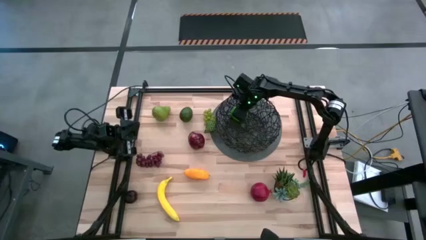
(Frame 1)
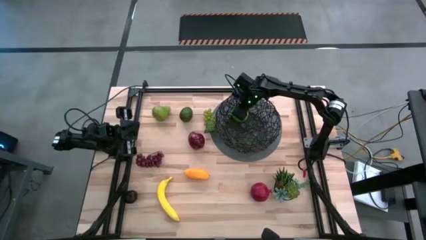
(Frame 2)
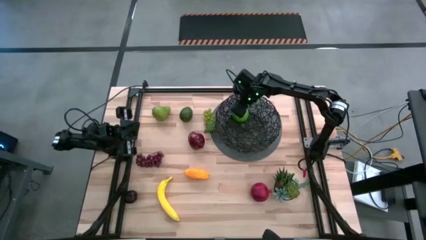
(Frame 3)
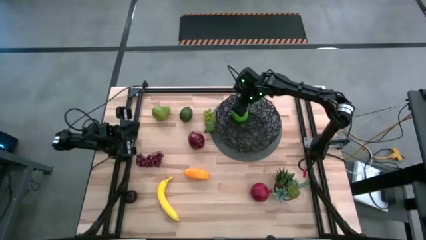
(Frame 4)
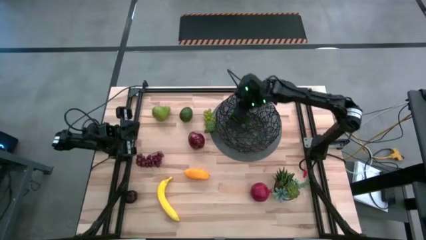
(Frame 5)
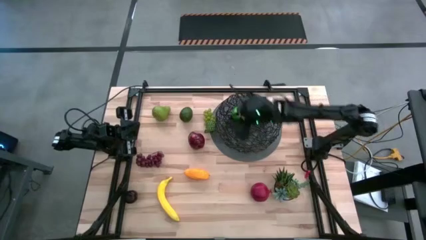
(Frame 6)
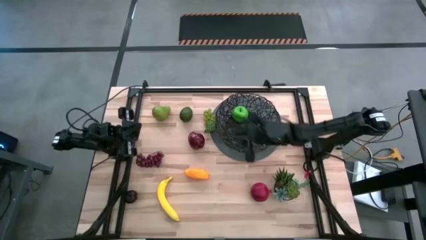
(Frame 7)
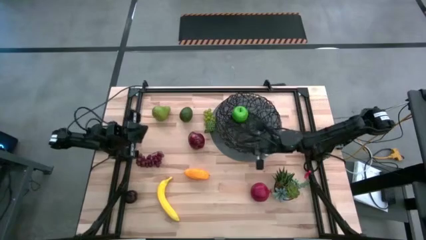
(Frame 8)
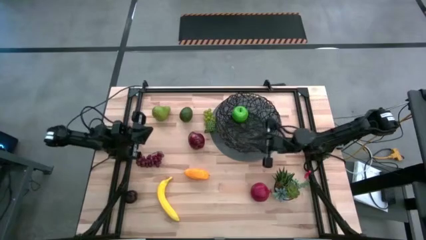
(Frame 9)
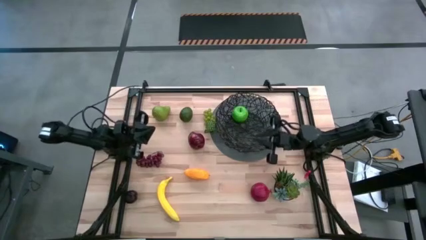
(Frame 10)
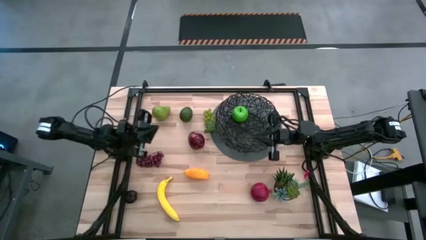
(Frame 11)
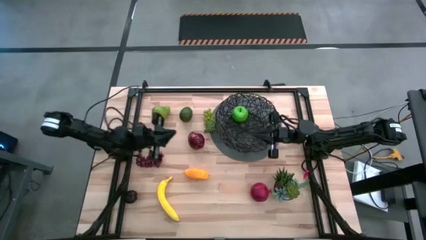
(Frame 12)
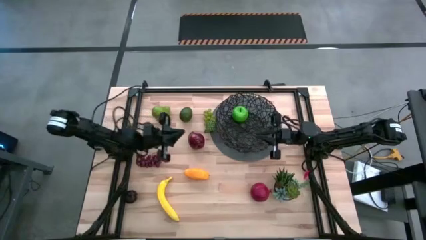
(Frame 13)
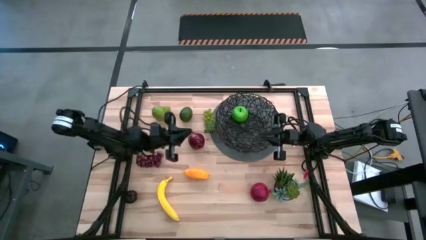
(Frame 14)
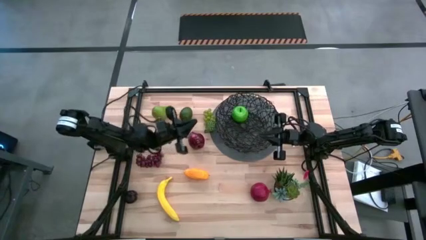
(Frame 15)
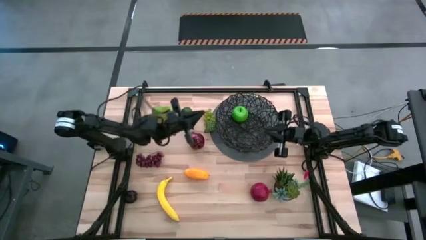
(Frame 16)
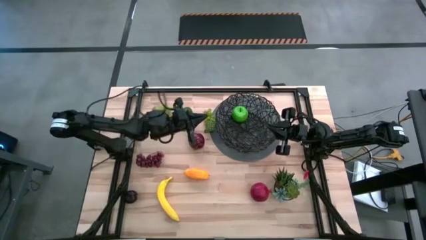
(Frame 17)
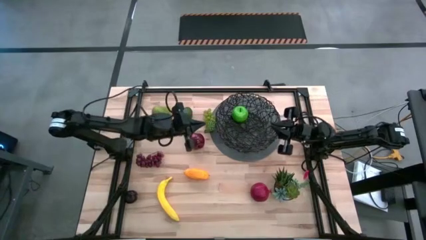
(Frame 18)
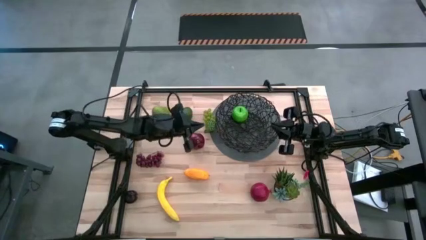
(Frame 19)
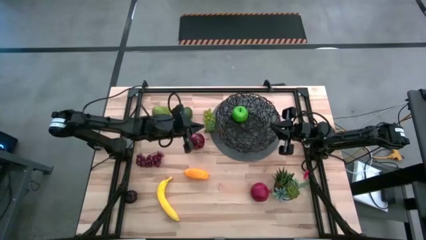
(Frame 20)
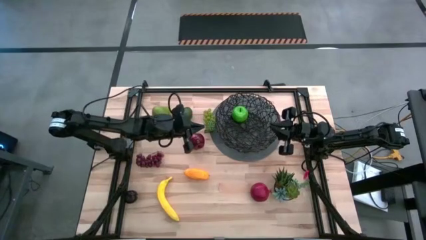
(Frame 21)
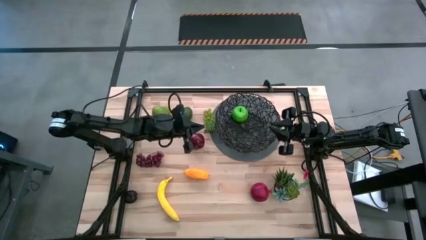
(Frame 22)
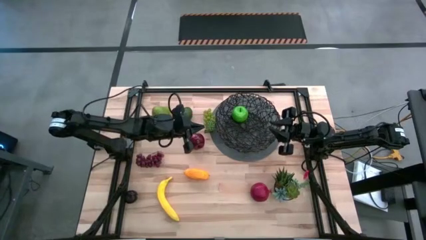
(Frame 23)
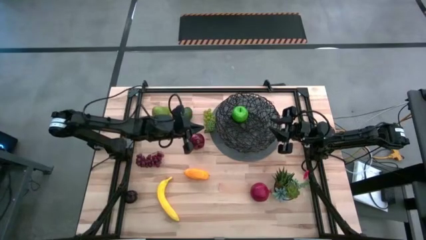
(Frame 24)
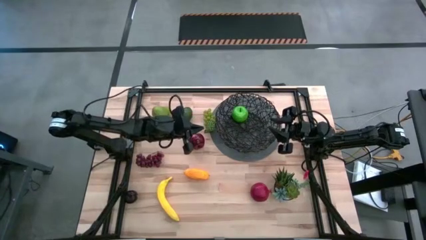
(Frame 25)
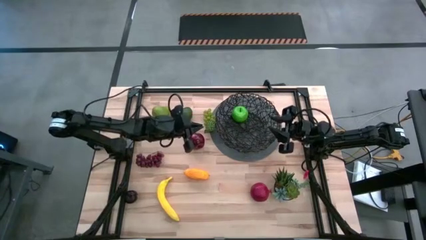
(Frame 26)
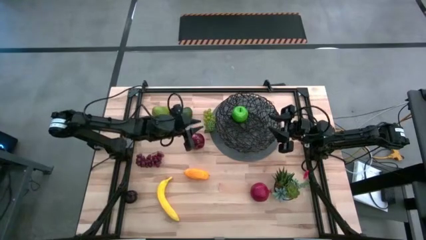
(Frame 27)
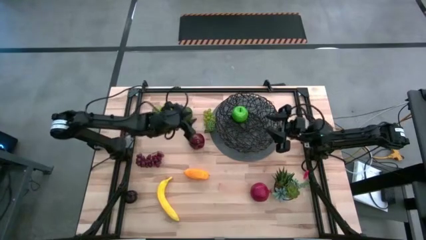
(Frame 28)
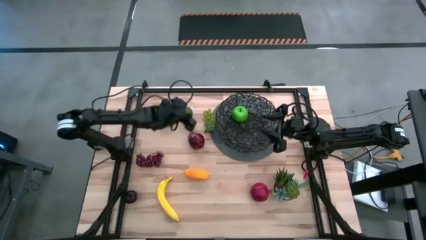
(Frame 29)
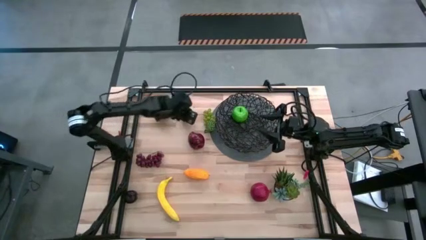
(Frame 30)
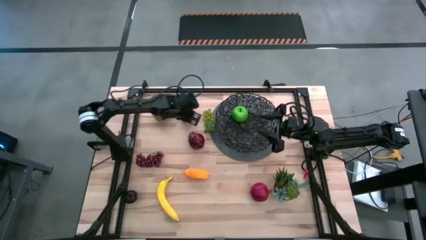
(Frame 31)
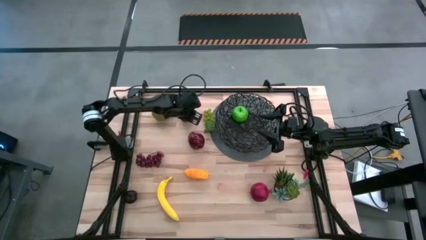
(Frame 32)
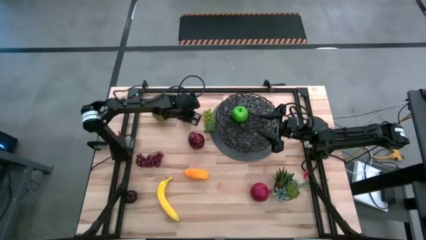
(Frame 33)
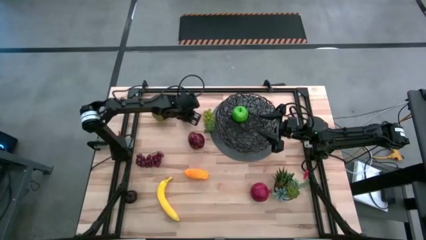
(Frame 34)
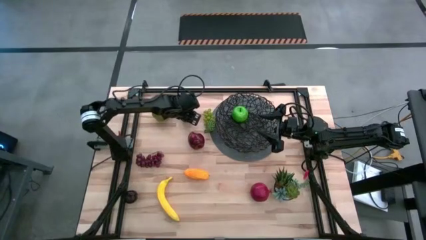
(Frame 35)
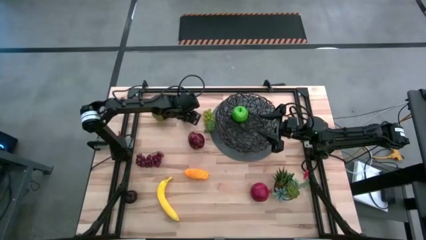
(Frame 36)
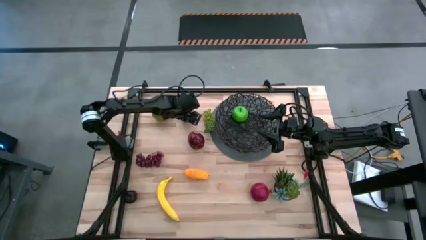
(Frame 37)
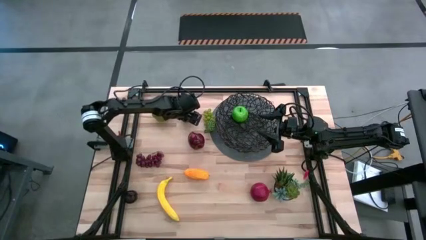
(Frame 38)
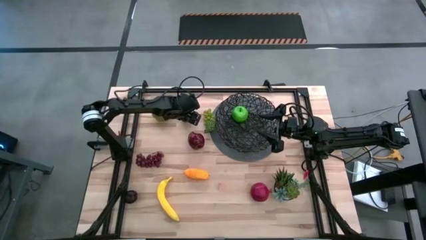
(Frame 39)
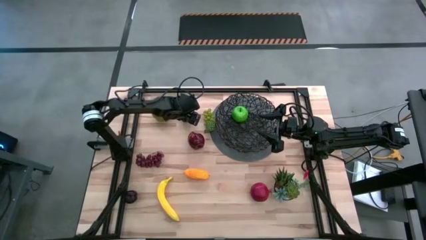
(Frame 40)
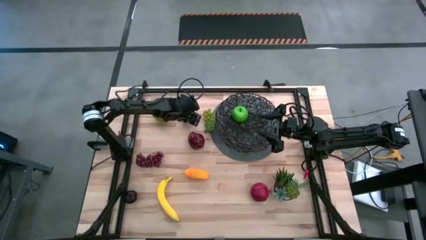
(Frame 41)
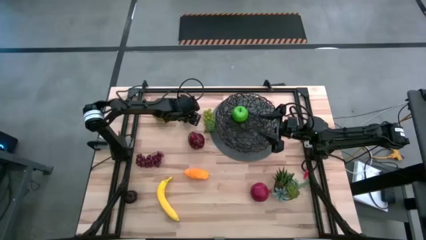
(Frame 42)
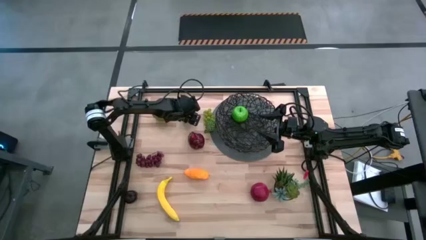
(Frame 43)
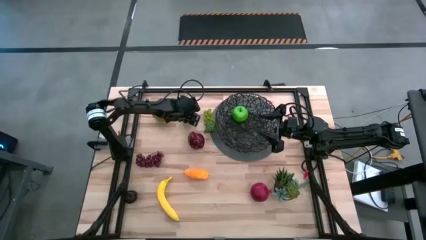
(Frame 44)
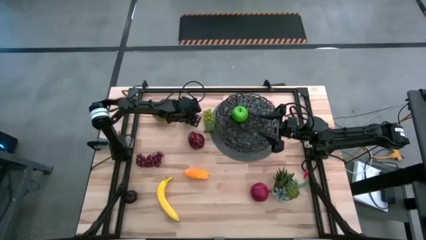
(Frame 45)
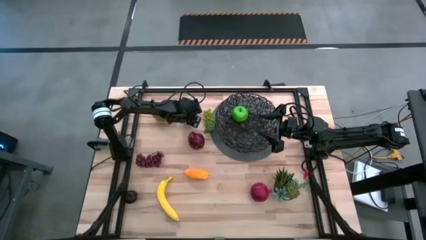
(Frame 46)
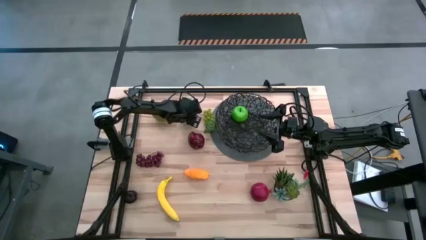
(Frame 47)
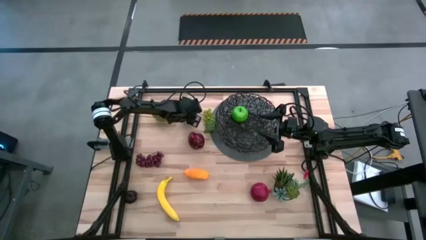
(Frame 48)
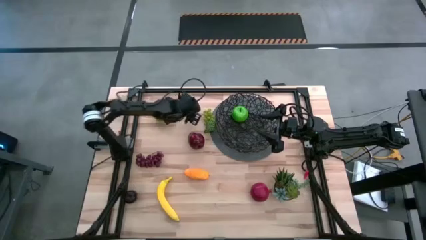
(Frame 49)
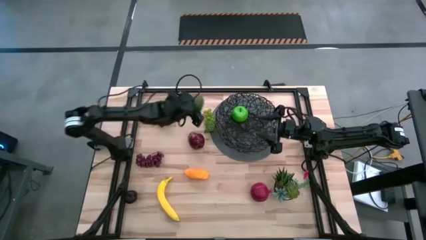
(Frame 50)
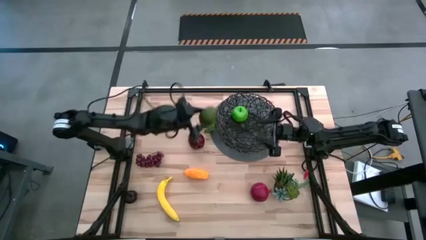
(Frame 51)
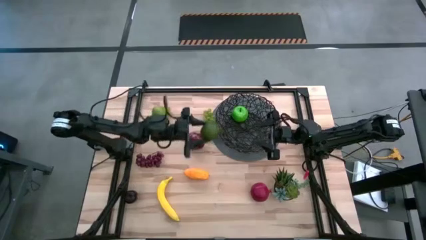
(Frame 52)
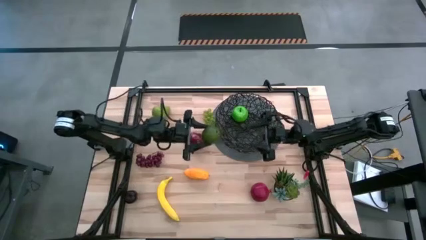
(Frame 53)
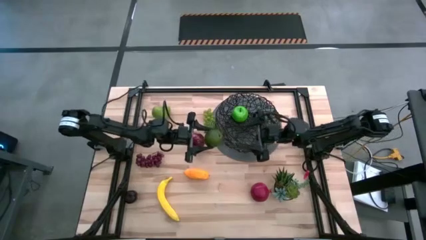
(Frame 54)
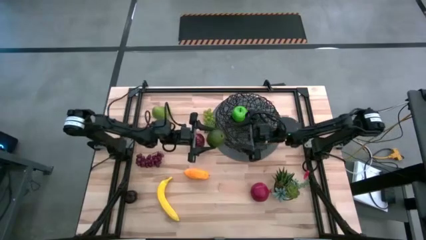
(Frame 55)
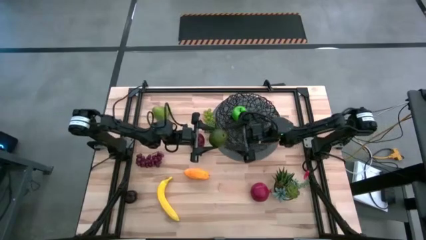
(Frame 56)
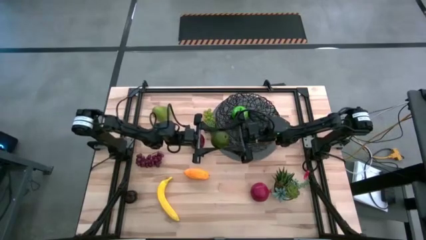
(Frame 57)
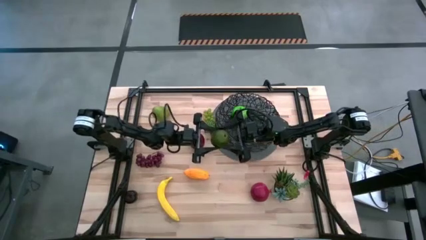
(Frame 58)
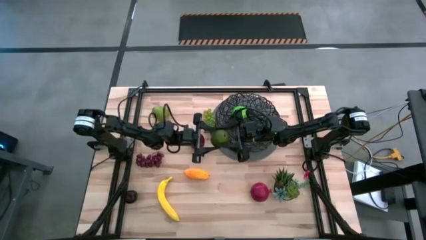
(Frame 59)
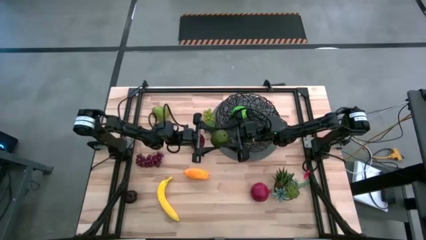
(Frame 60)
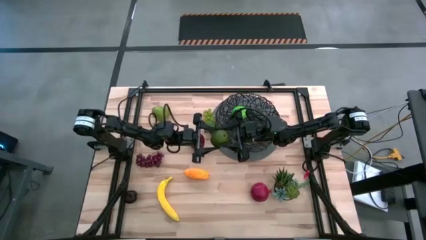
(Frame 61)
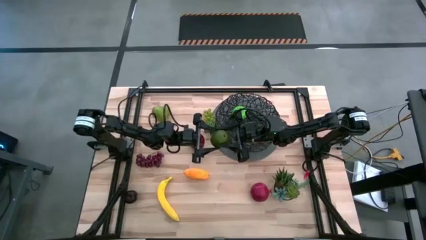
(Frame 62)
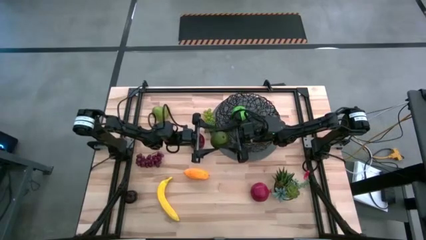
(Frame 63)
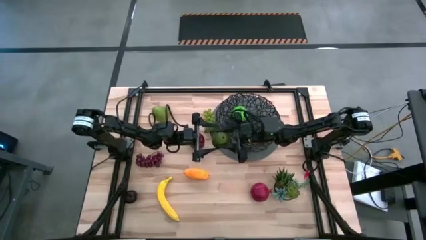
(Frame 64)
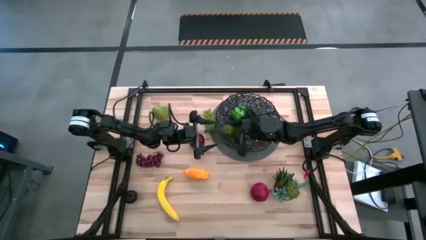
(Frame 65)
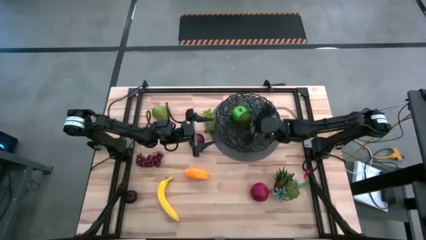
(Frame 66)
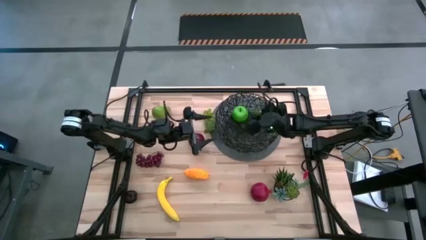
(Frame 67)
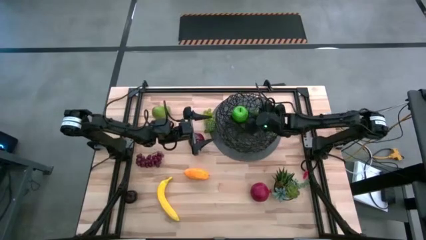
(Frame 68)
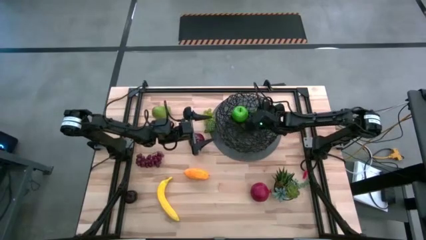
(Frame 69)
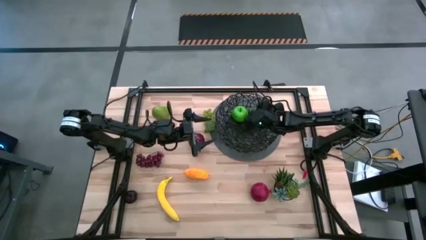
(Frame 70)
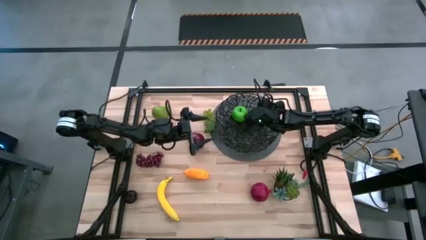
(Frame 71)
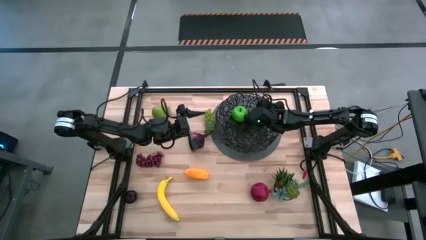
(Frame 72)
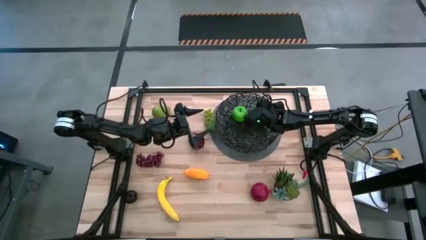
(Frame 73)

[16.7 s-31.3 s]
Task: Build produce basket
Put the lime into the wire basket
